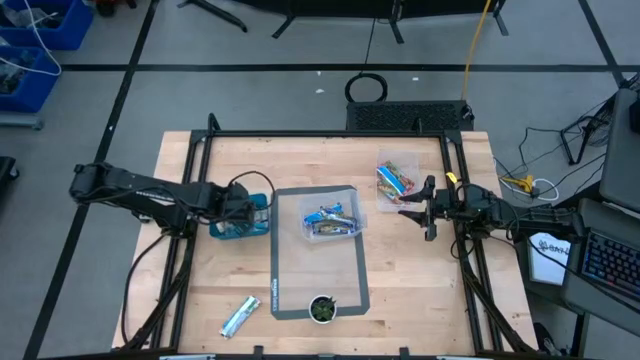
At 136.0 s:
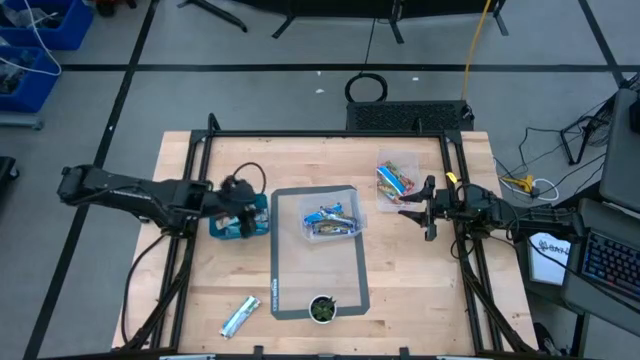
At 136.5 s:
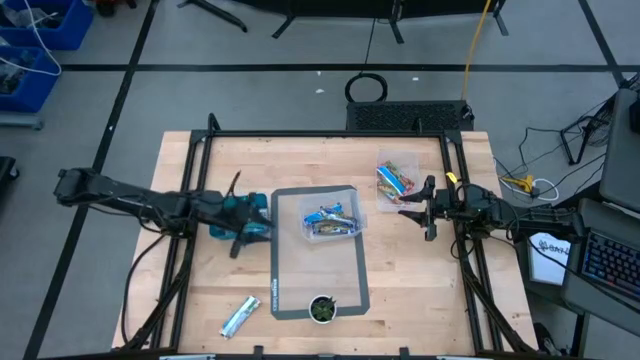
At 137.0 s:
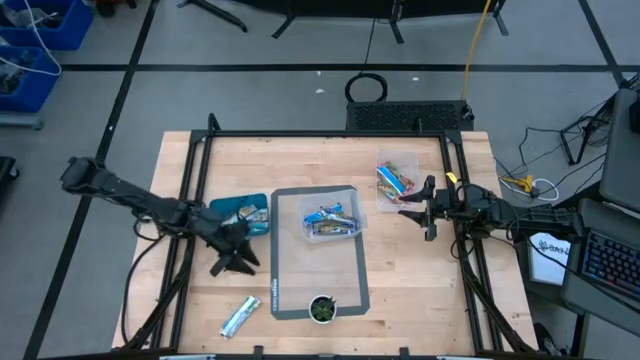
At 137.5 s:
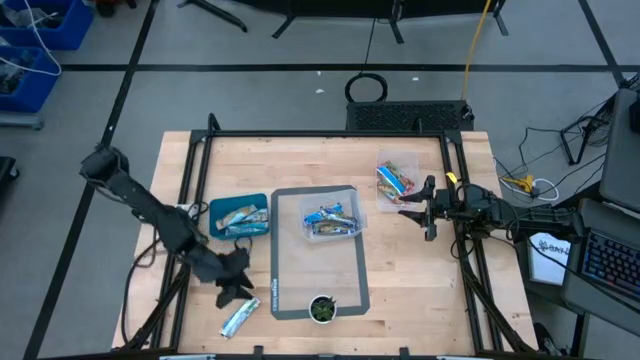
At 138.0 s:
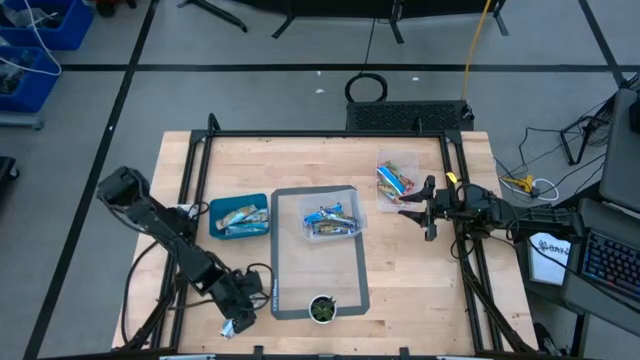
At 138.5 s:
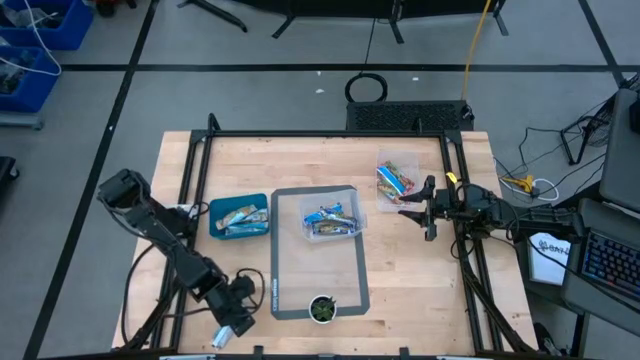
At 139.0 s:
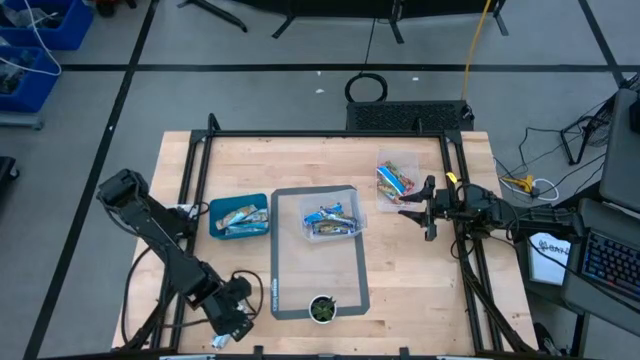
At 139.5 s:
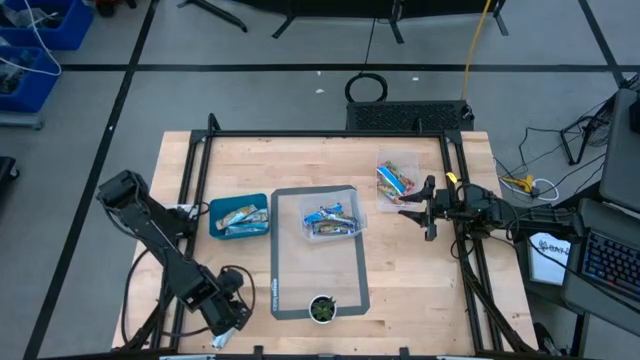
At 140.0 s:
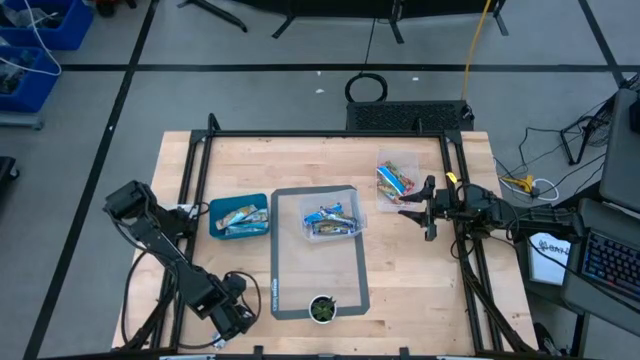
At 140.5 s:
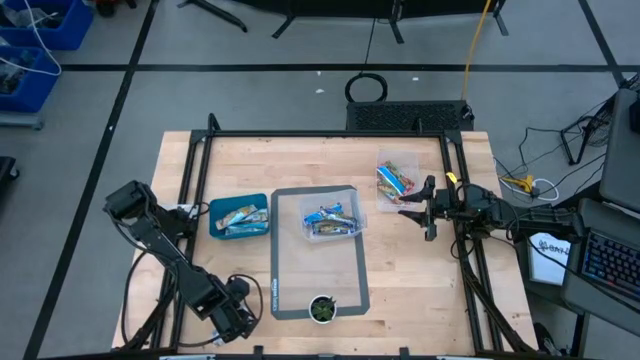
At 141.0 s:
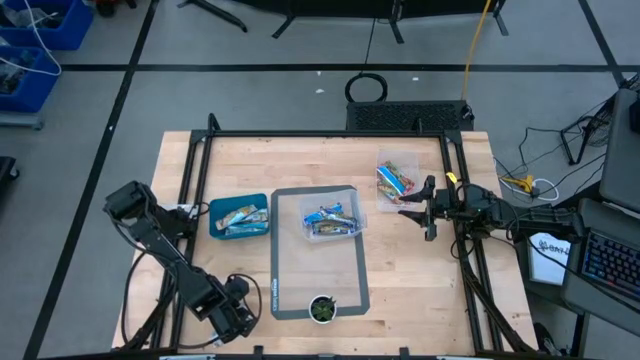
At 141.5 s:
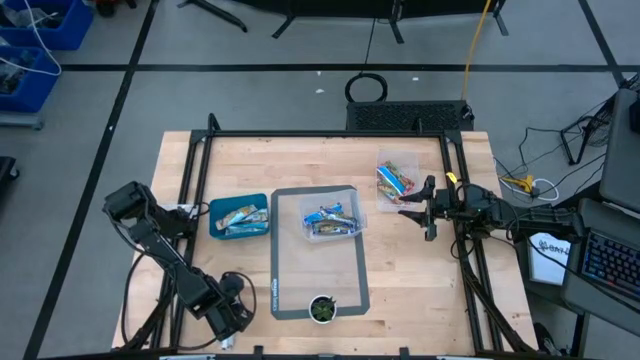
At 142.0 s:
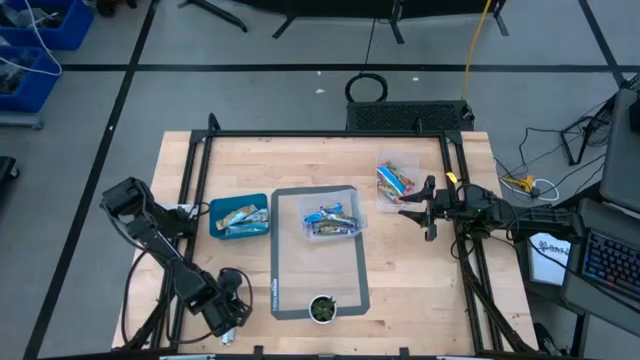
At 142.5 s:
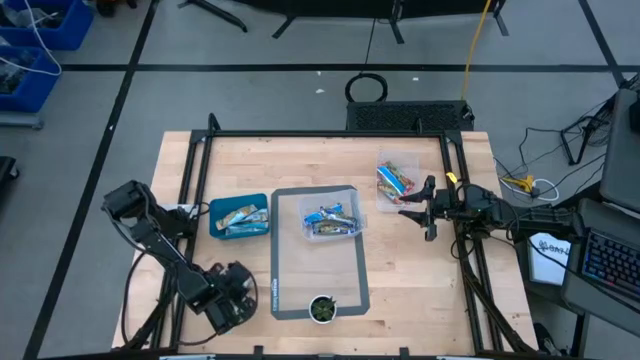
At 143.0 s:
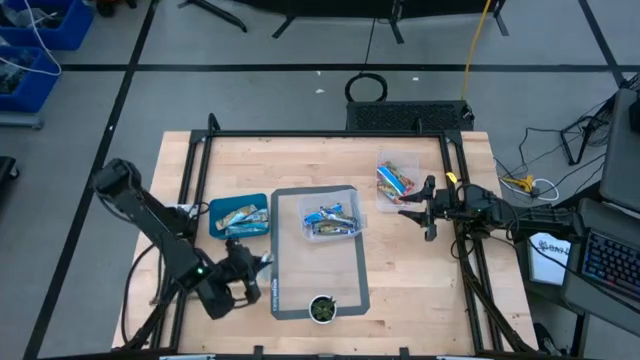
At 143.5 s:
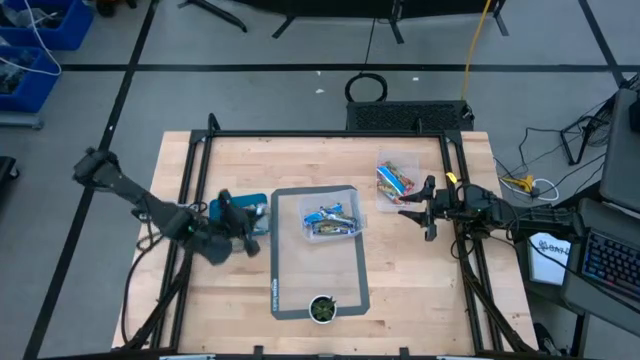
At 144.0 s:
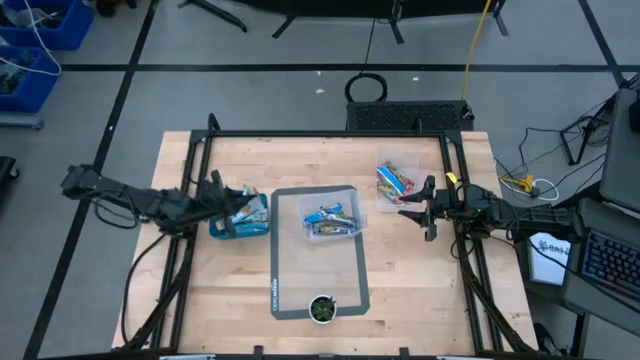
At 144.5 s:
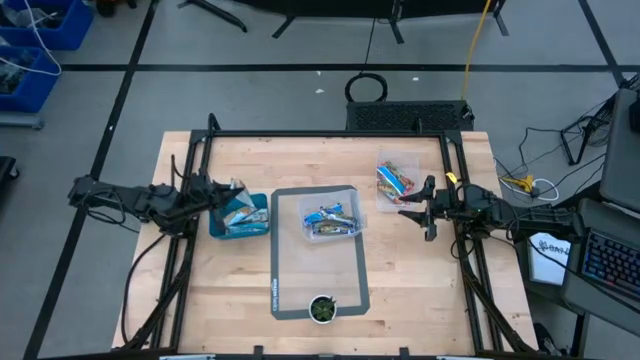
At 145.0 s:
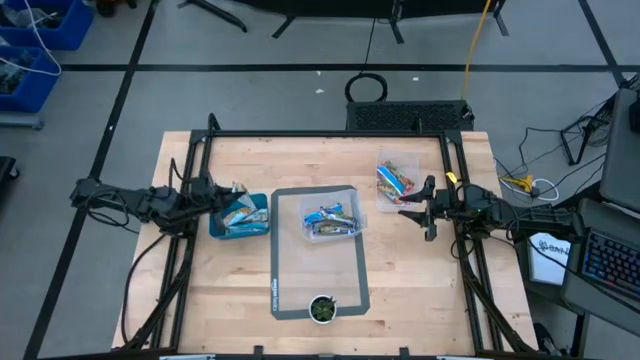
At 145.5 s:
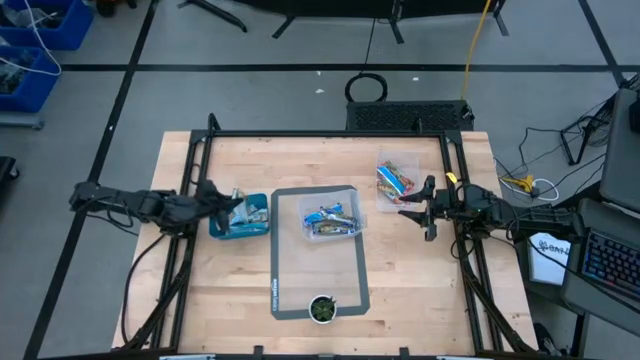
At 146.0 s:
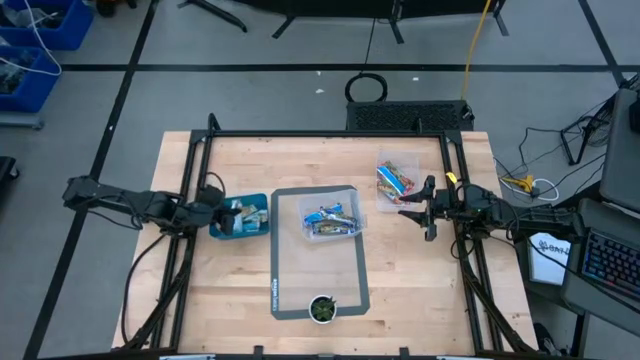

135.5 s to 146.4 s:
Task: Pick and place Granola Bars by type
Put the orange granola bar into the blue bin

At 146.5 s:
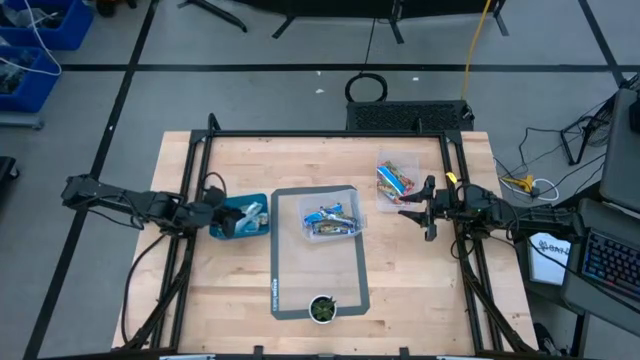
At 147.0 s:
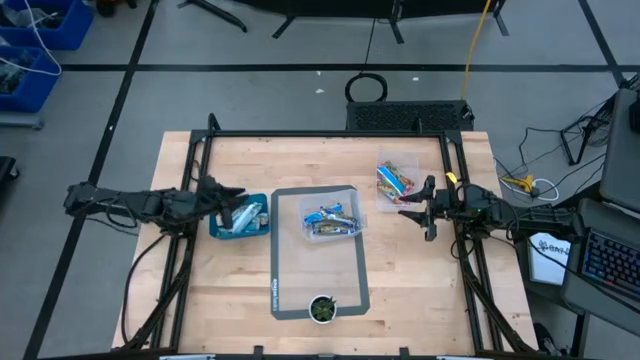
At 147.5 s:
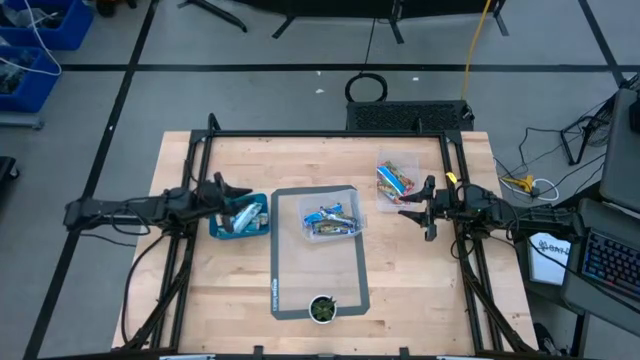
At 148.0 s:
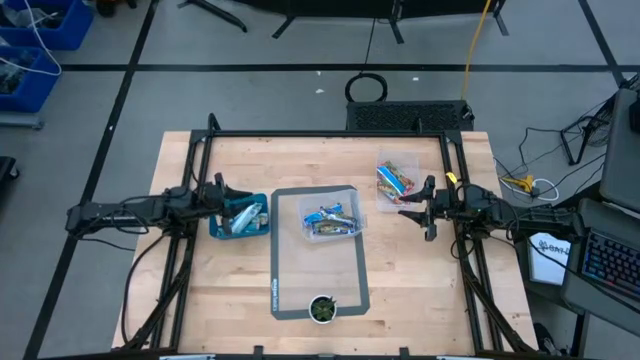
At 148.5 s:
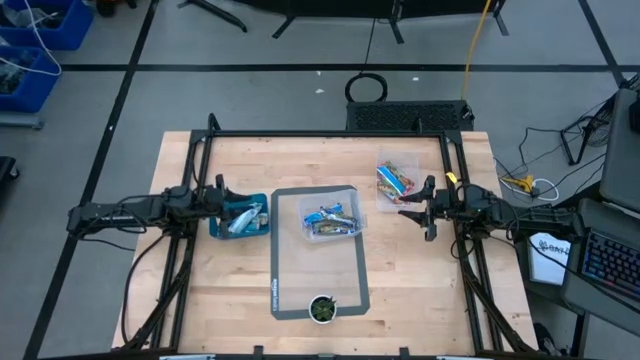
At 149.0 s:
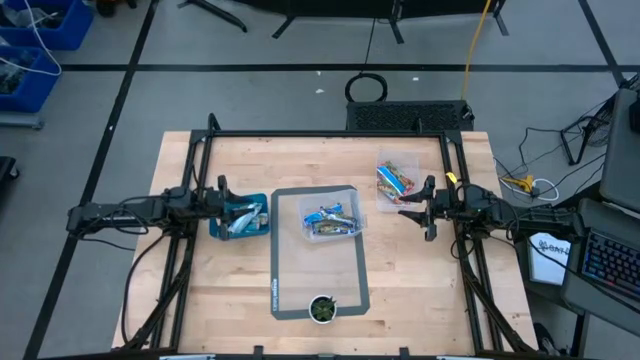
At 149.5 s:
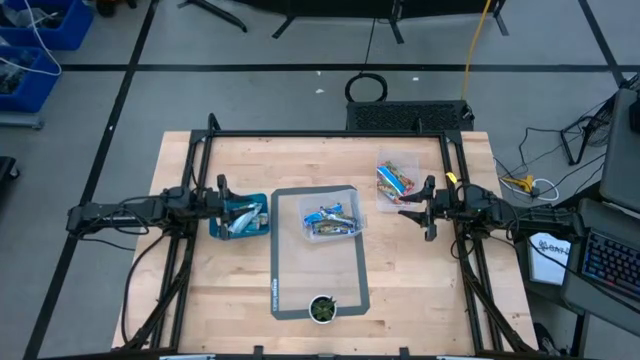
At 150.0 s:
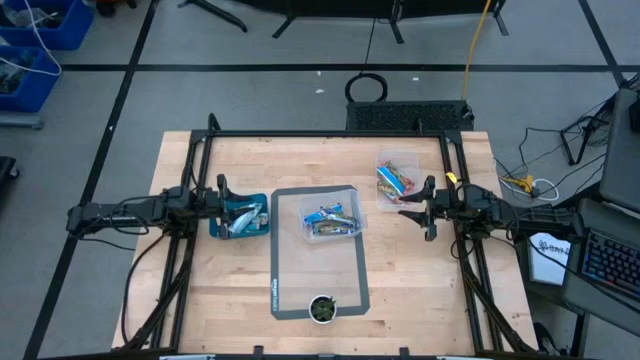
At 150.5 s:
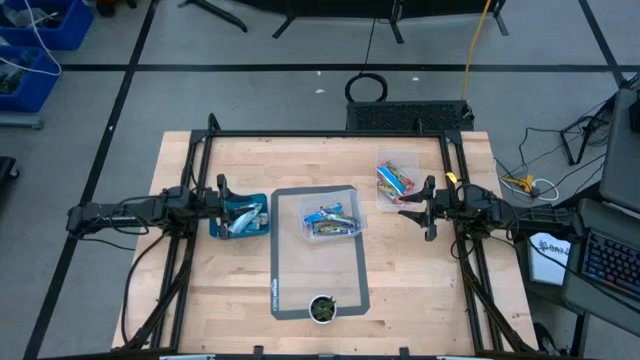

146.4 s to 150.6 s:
Return to Home Position

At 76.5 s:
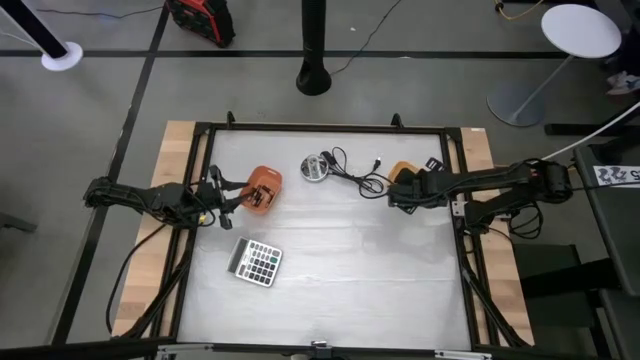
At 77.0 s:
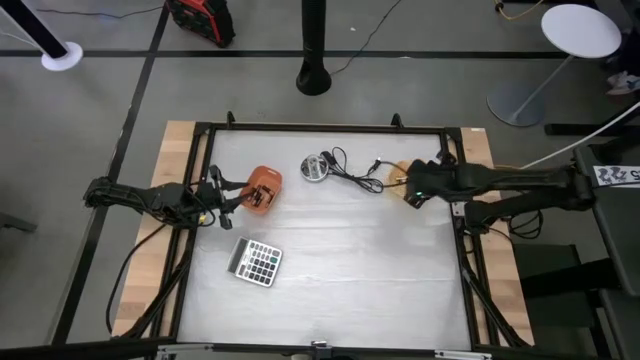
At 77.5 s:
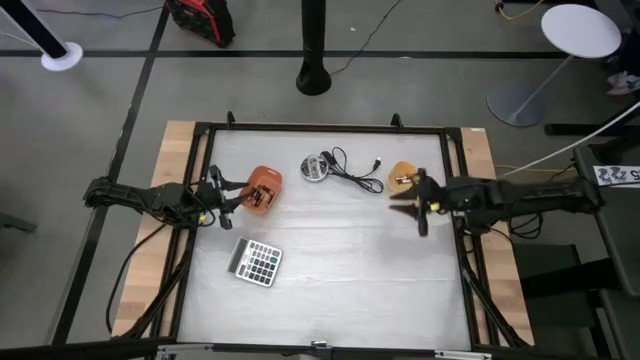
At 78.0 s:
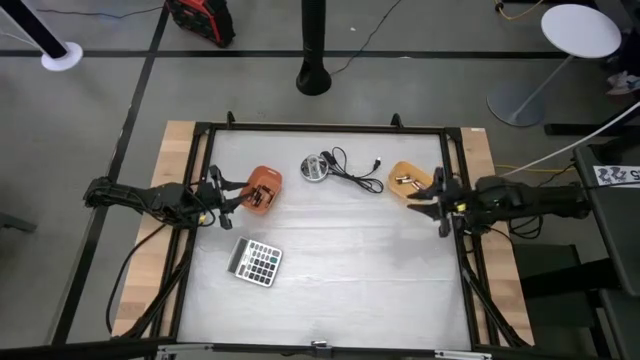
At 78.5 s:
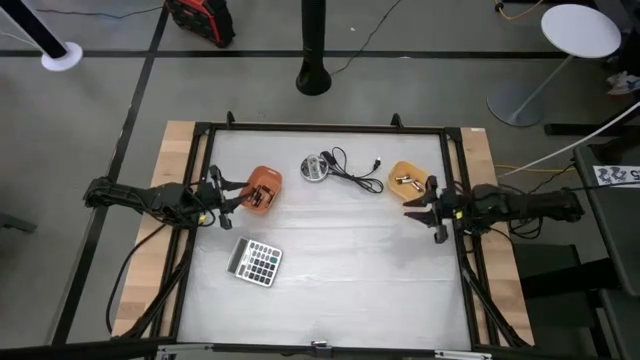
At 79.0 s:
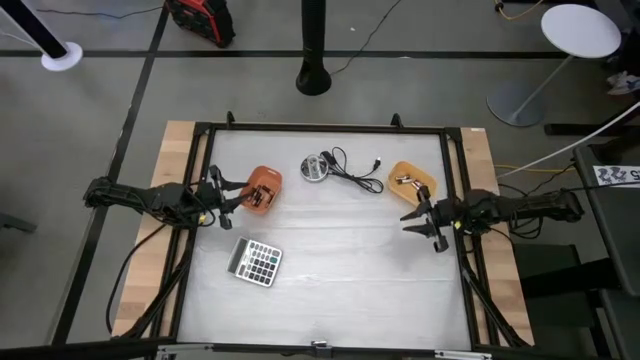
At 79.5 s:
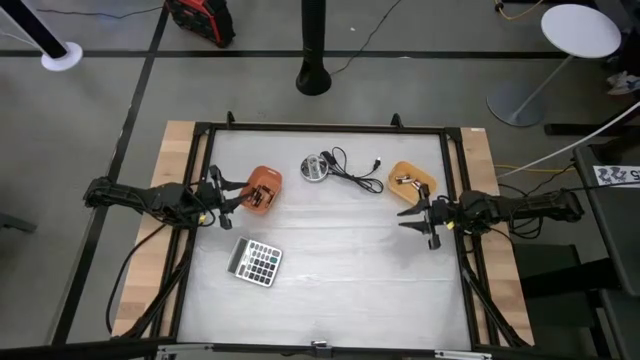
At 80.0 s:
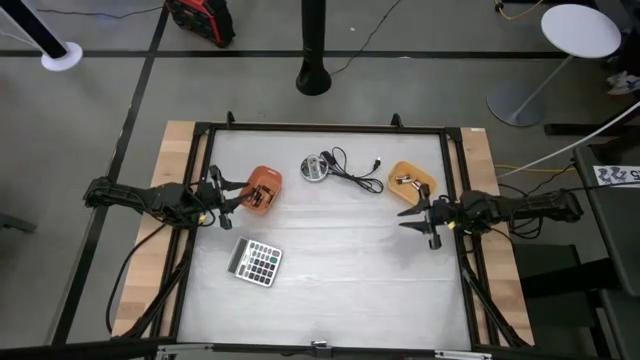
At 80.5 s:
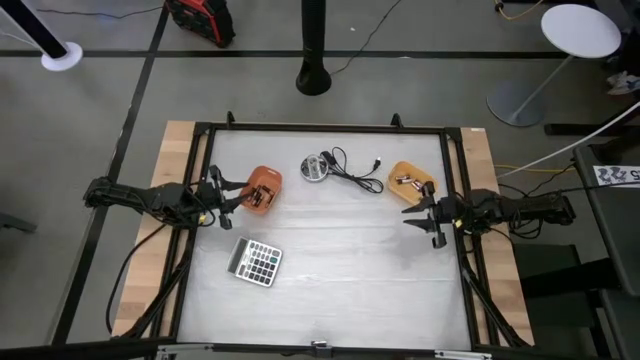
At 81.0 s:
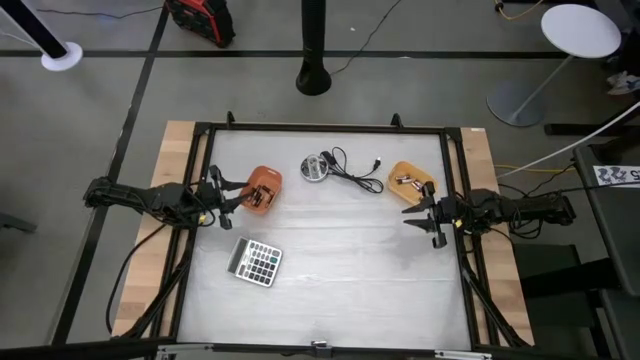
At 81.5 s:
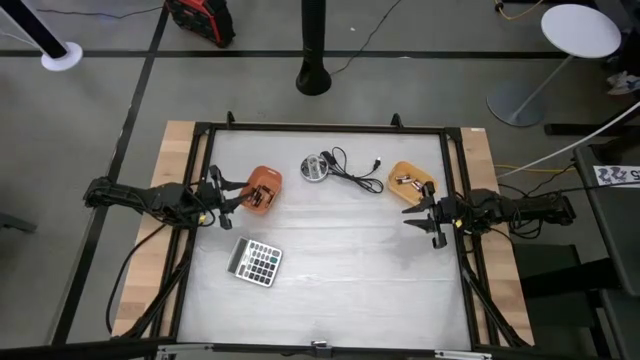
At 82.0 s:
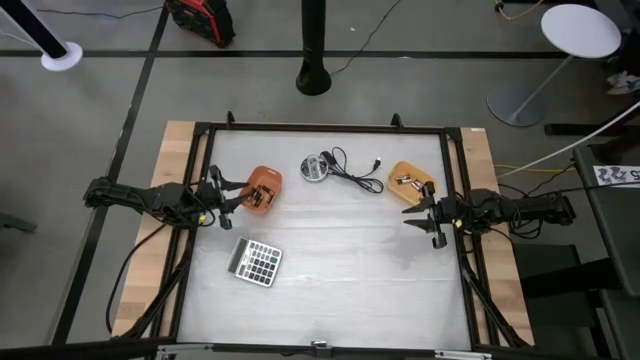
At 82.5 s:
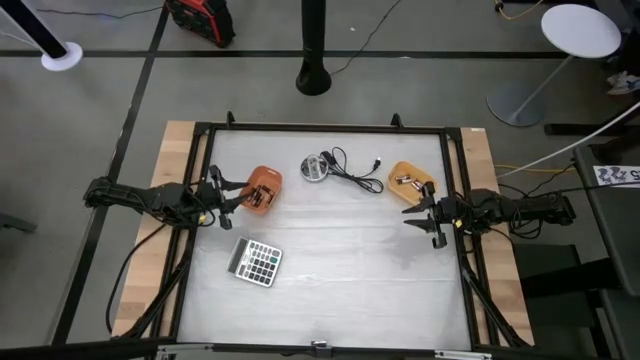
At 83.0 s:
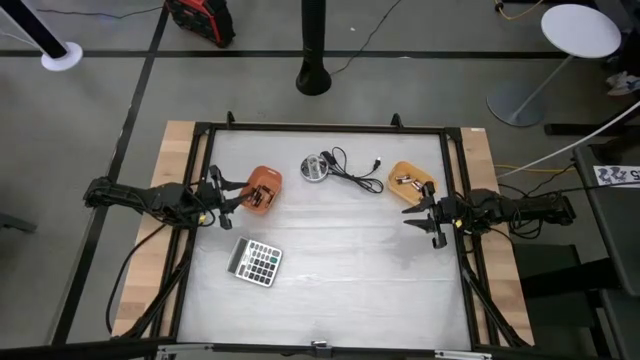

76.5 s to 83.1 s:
Task: Sort batteries
Return to Home Position
